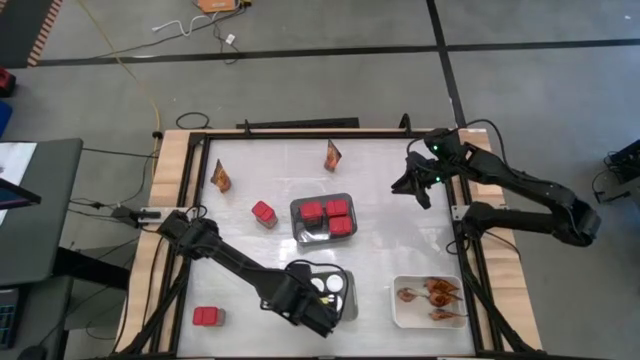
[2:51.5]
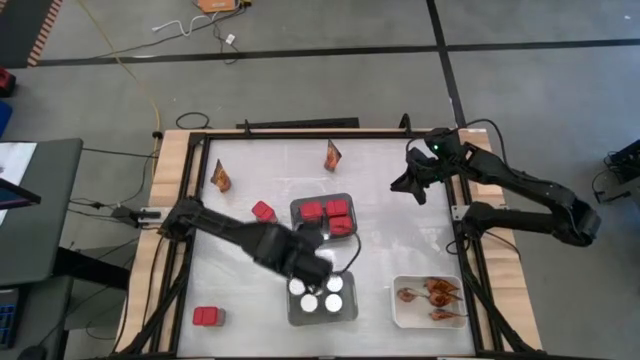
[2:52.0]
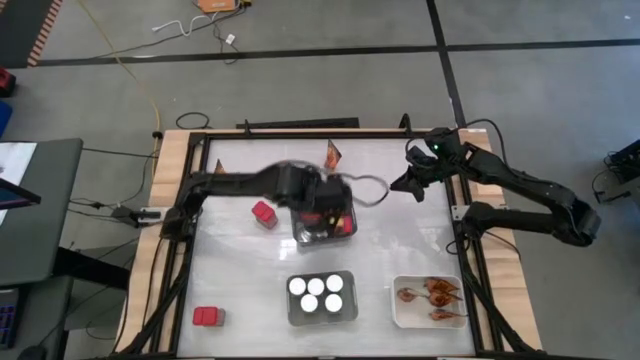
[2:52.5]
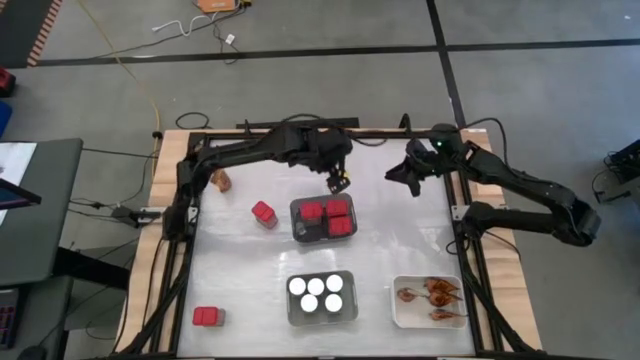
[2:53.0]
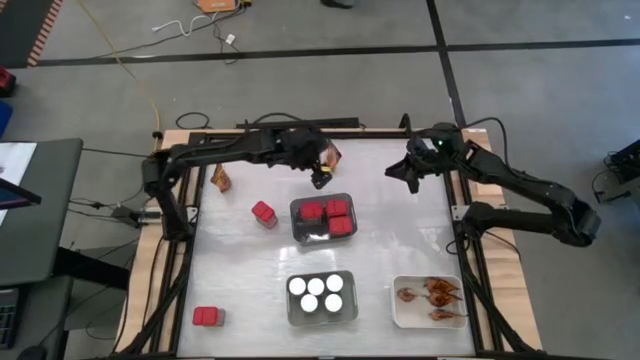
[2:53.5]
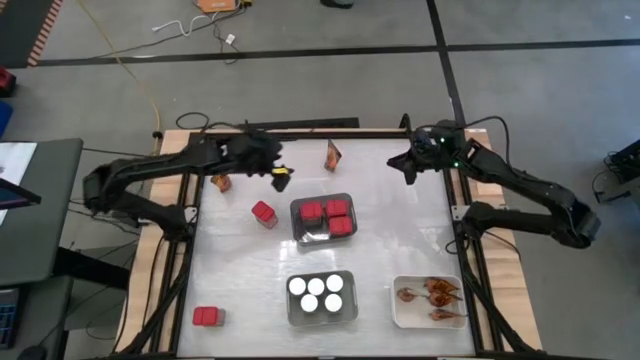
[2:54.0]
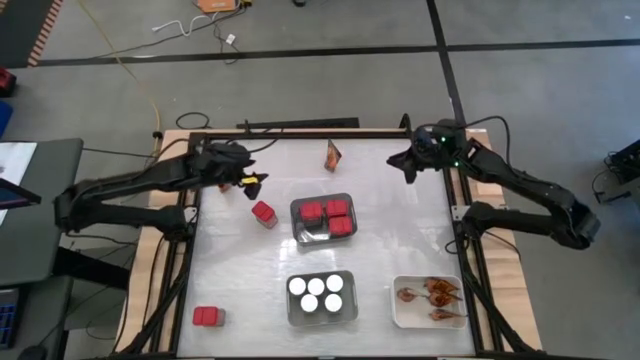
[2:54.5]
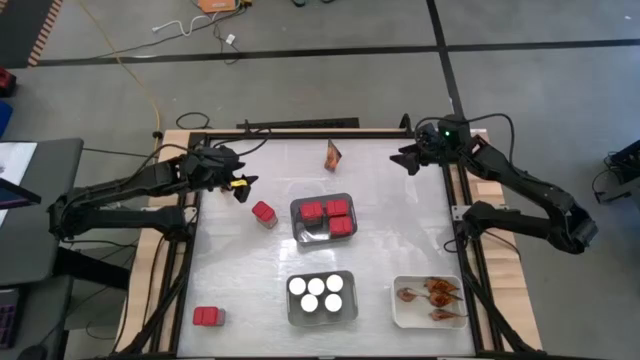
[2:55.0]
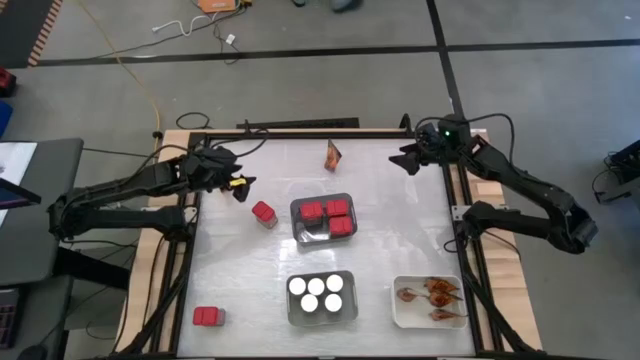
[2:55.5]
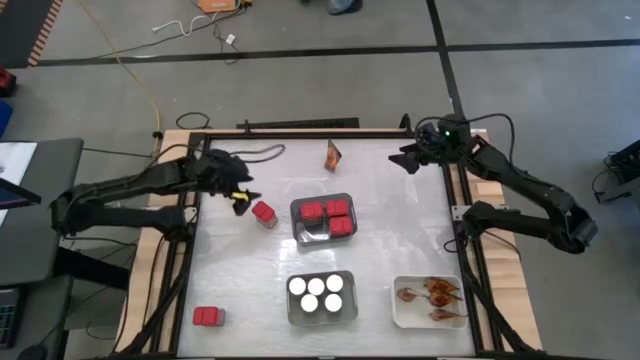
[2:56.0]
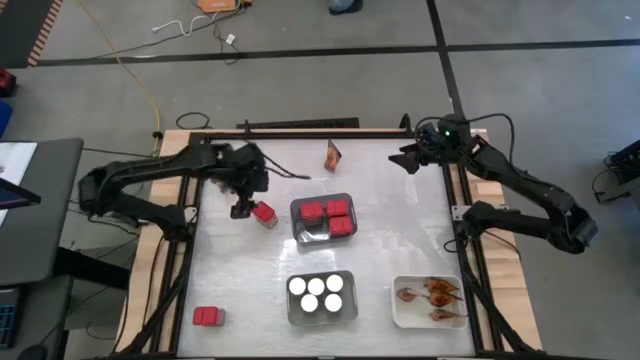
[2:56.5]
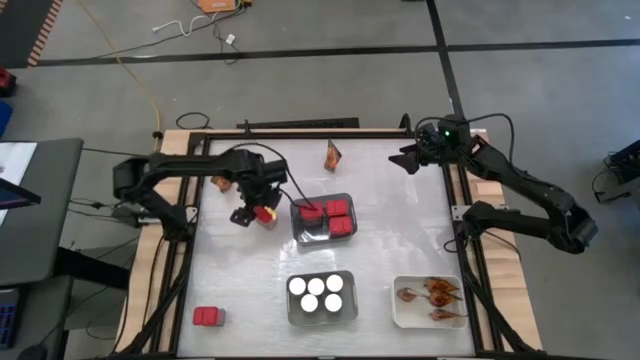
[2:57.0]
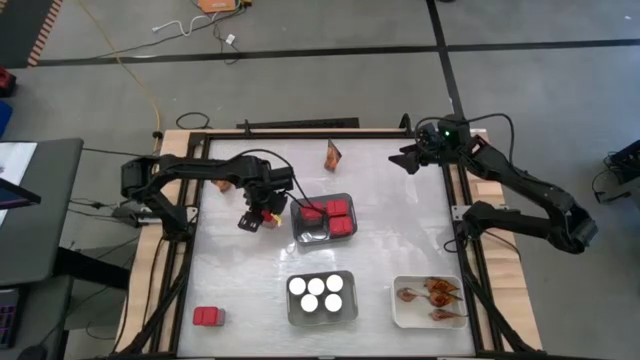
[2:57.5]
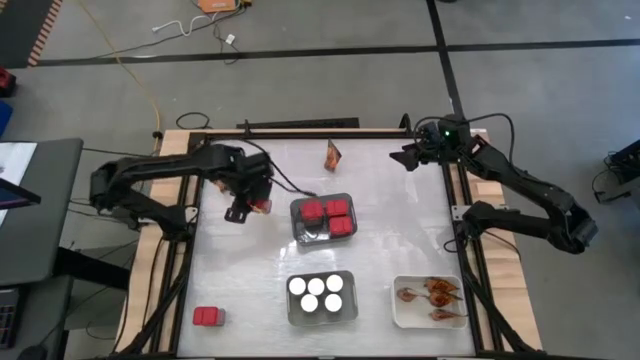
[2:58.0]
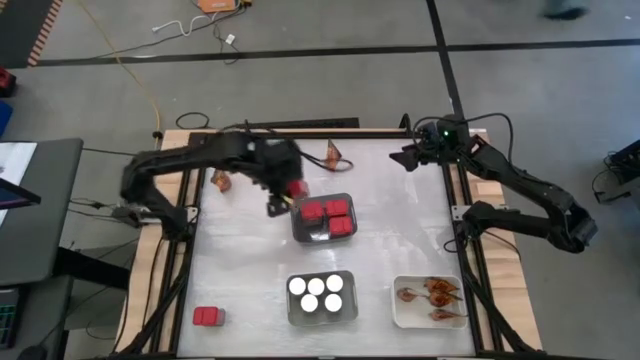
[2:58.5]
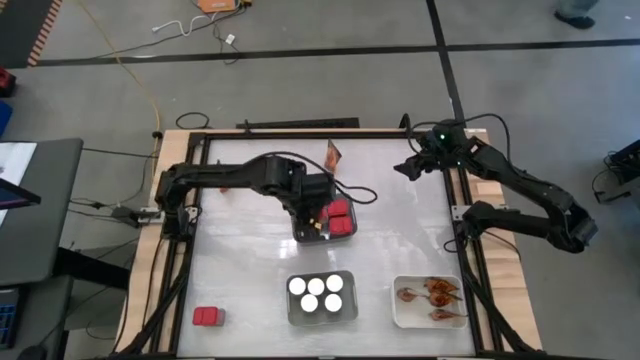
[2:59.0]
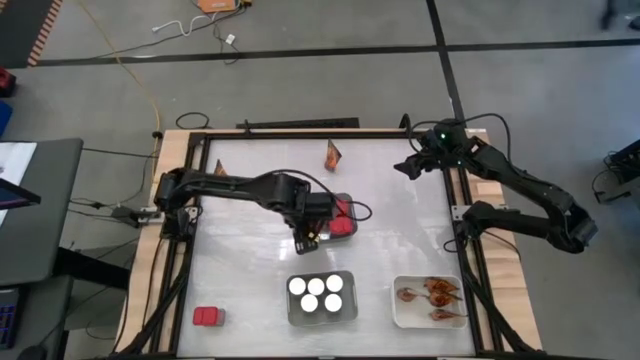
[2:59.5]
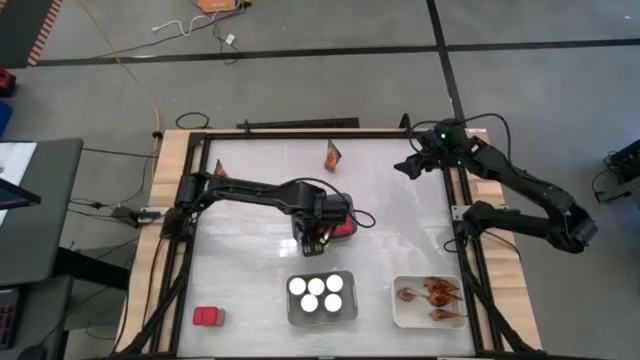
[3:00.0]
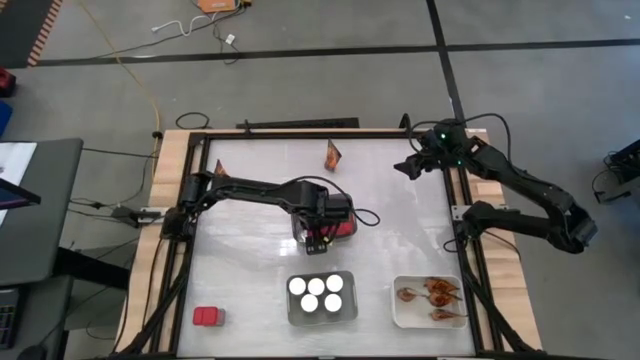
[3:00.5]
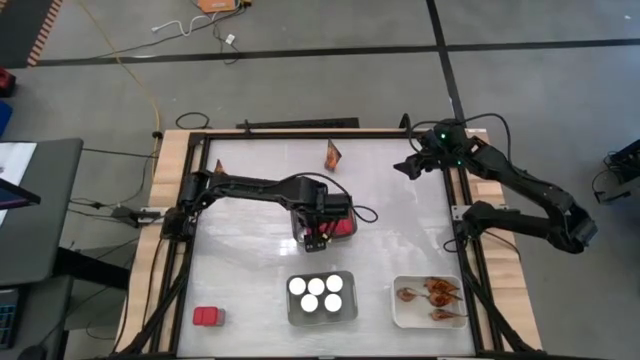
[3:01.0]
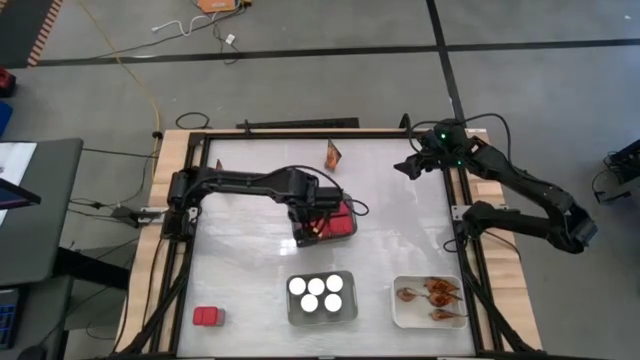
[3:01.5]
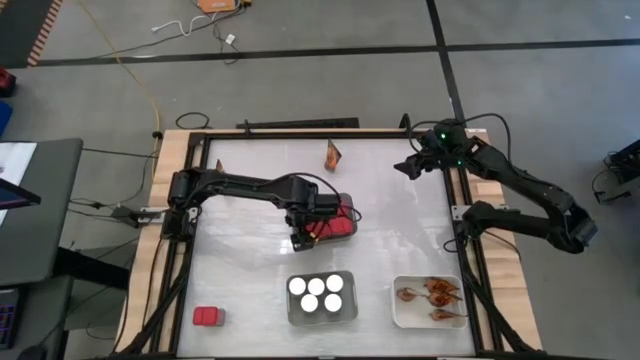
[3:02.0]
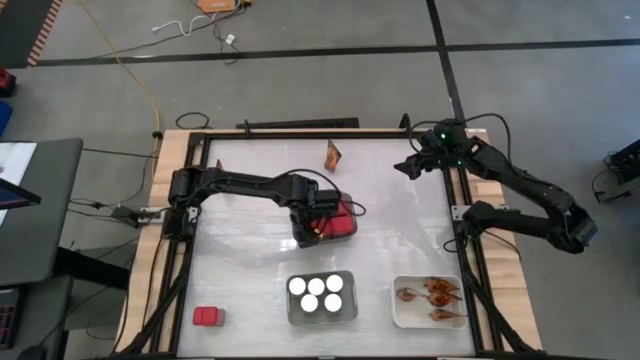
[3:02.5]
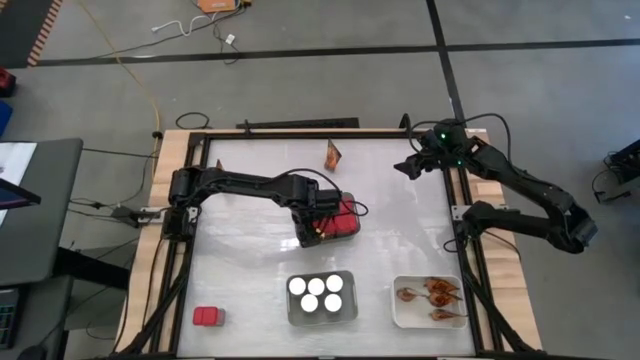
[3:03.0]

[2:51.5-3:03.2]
Task: Sort spices by type
Put the red seasoning can into the black bin

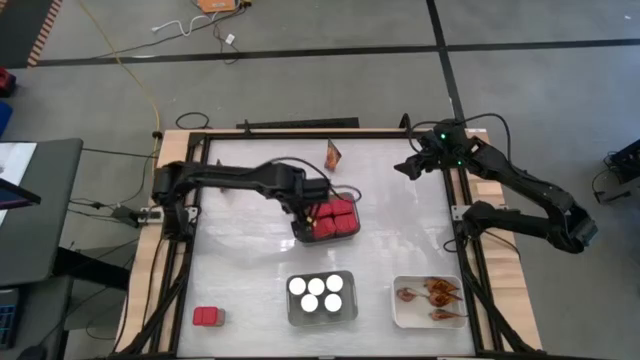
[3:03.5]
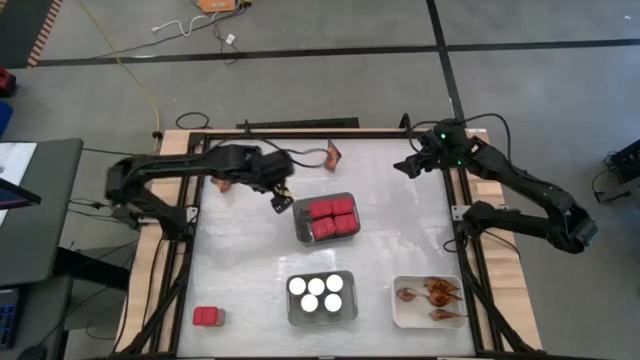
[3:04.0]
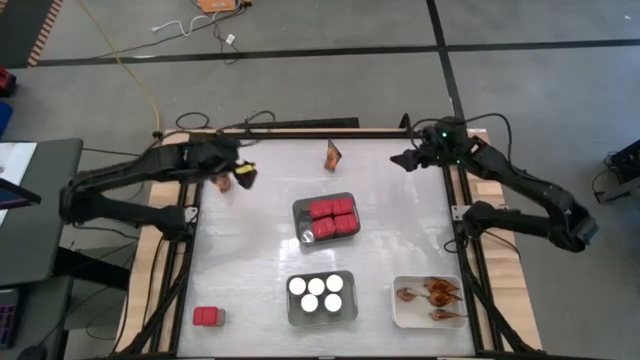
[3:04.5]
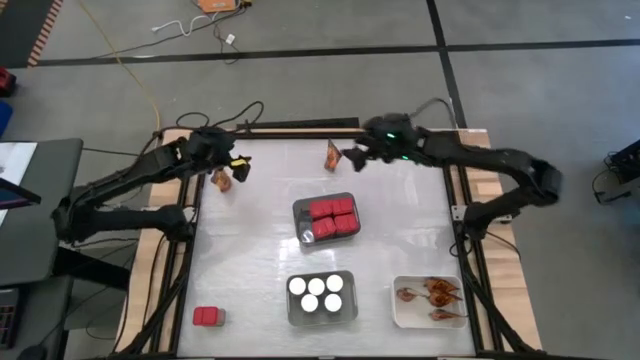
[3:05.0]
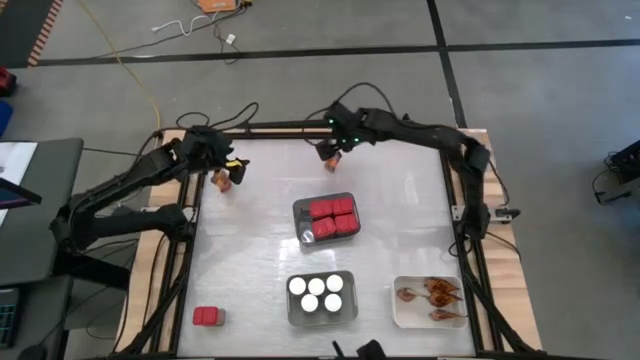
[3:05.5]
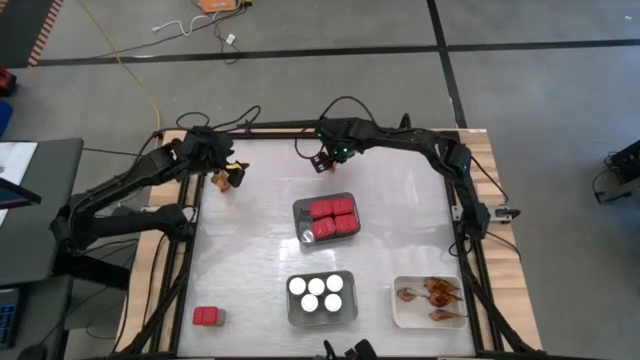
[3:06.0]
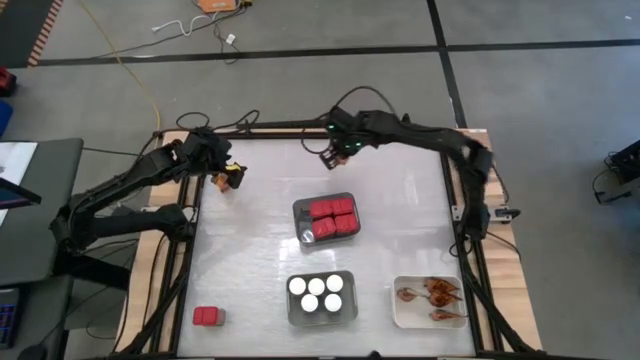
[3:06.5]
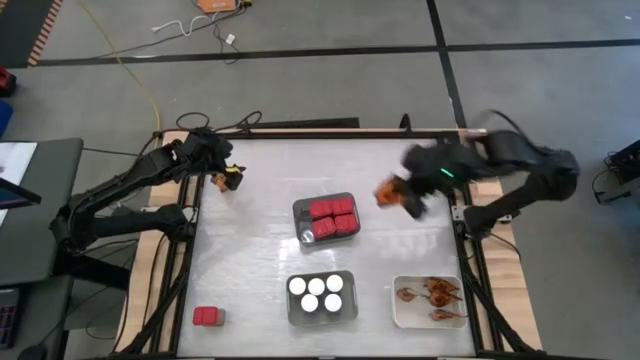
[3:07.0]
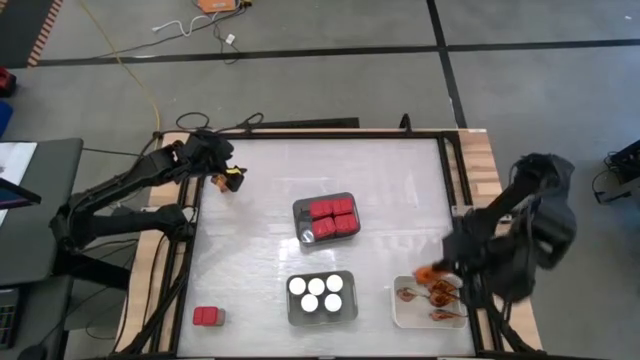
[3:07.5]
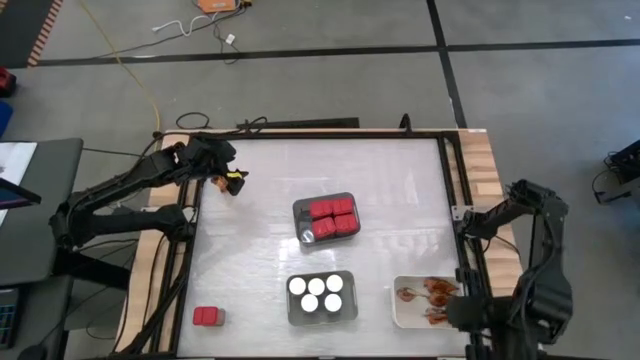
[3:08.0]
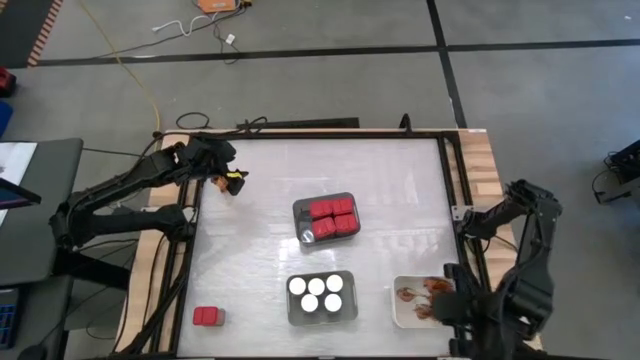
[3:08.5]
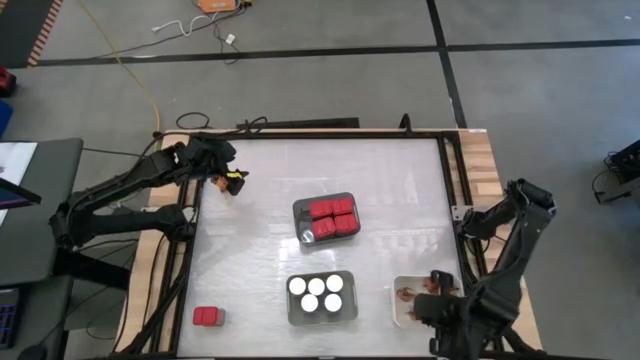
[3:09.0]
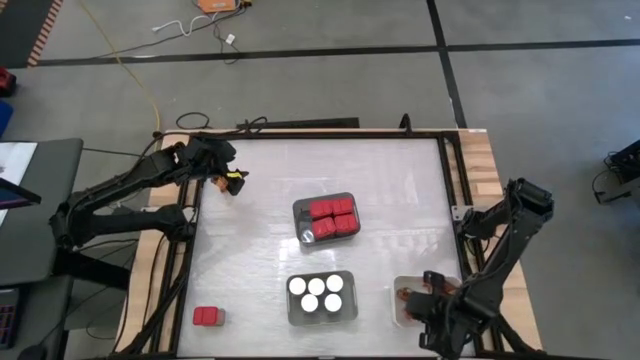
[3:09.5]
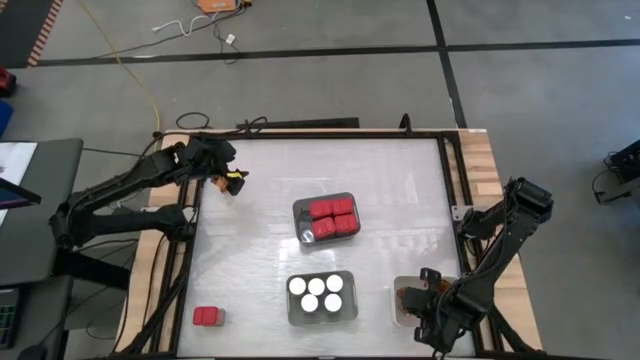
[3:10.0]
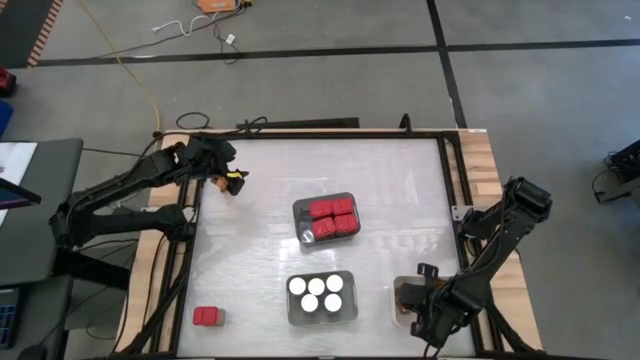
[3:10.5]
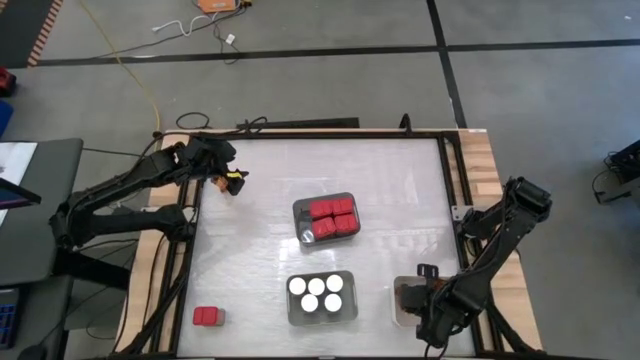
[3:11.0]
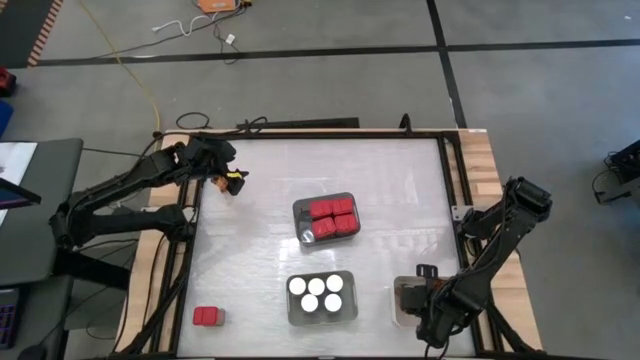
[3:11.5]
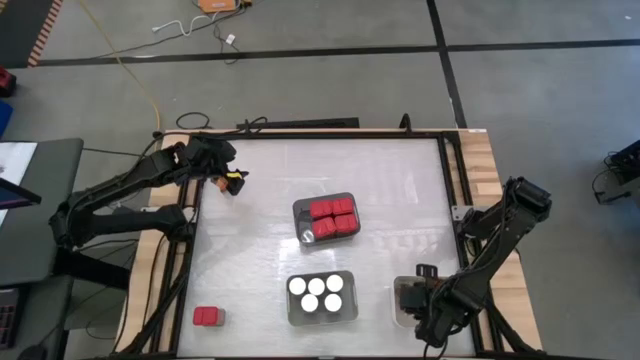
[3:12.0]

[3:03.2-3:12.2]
Put the orange seasoning pack into the white bin
